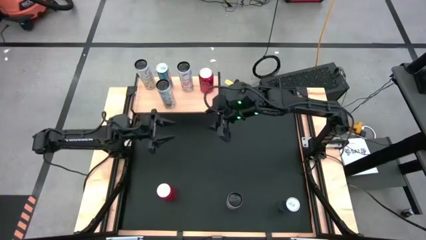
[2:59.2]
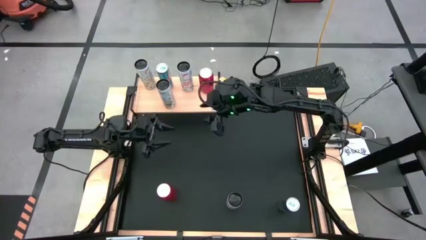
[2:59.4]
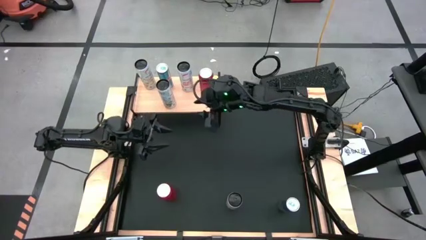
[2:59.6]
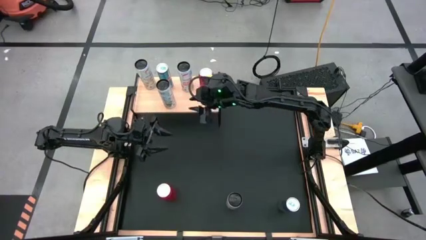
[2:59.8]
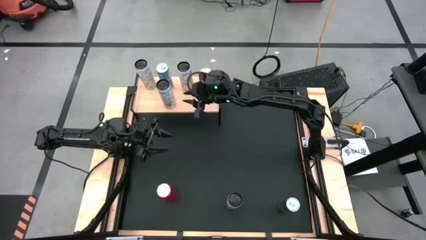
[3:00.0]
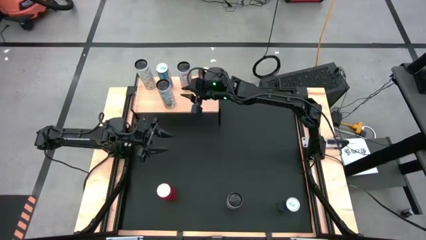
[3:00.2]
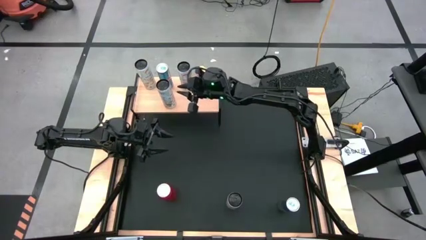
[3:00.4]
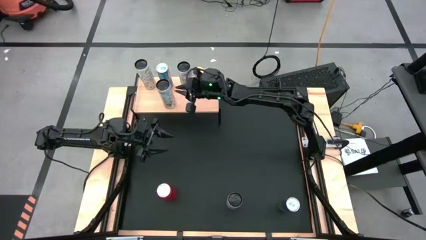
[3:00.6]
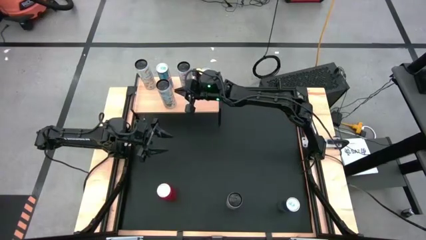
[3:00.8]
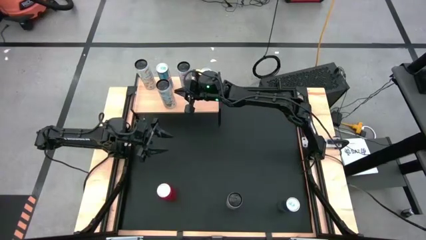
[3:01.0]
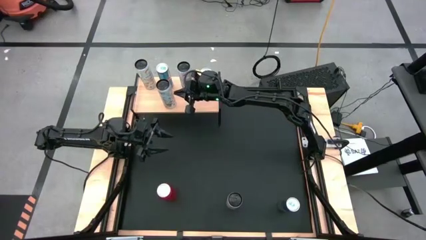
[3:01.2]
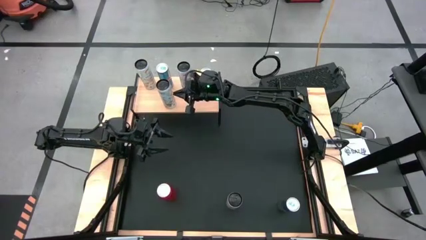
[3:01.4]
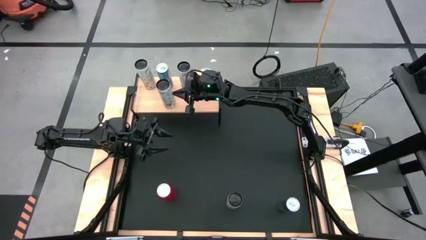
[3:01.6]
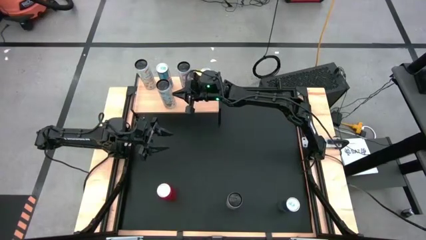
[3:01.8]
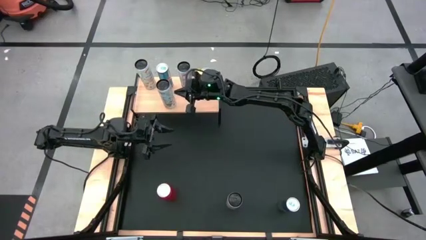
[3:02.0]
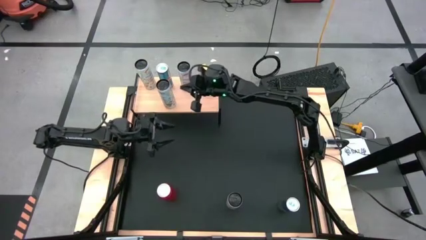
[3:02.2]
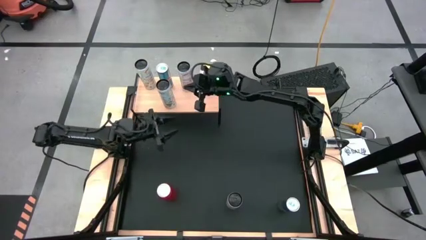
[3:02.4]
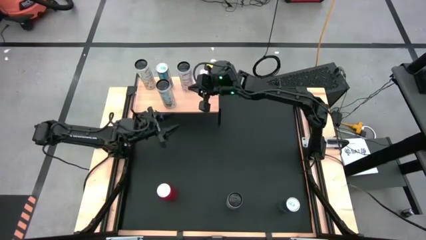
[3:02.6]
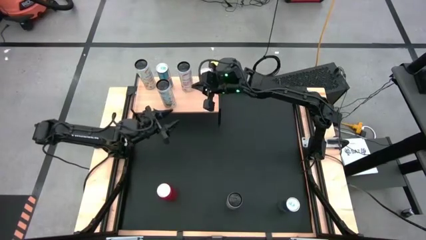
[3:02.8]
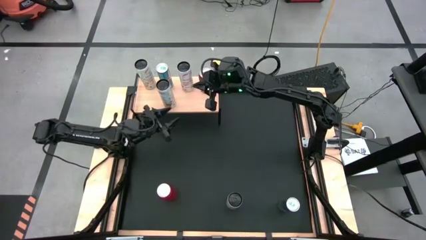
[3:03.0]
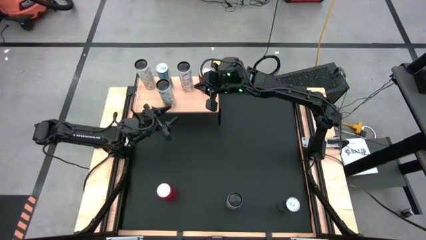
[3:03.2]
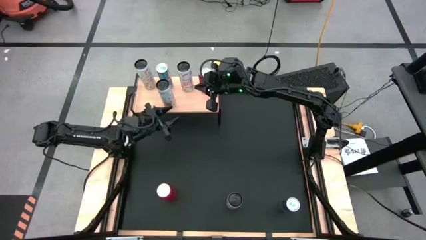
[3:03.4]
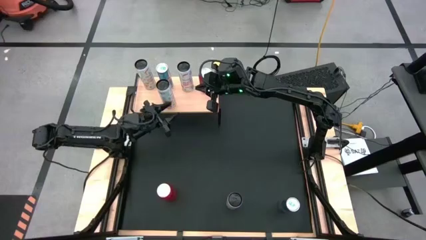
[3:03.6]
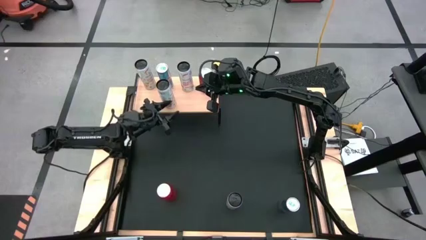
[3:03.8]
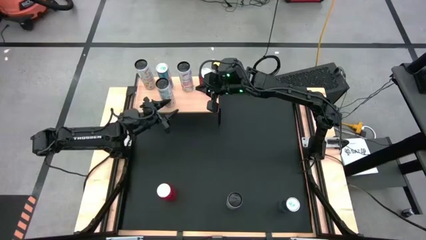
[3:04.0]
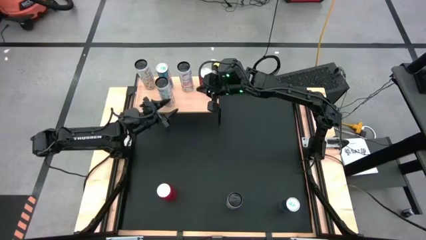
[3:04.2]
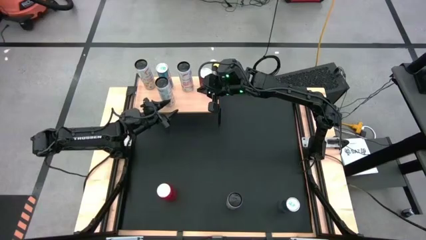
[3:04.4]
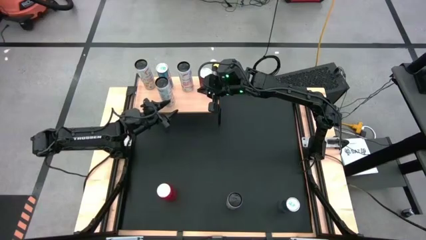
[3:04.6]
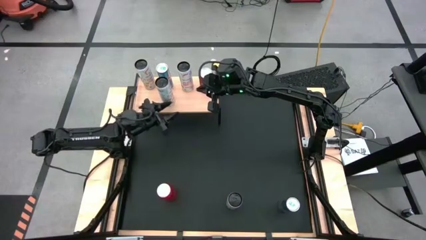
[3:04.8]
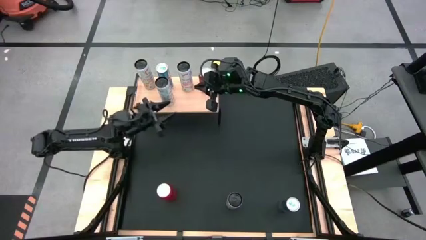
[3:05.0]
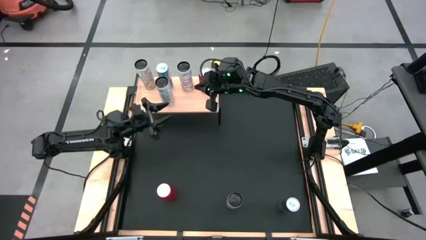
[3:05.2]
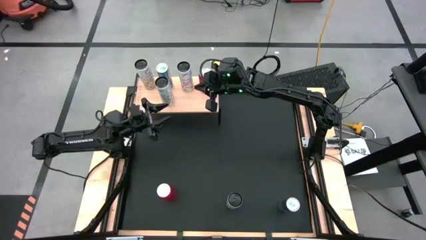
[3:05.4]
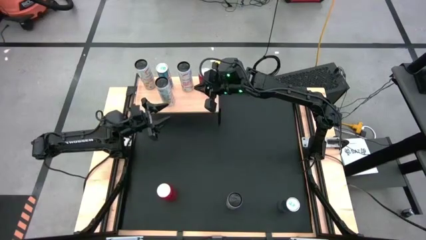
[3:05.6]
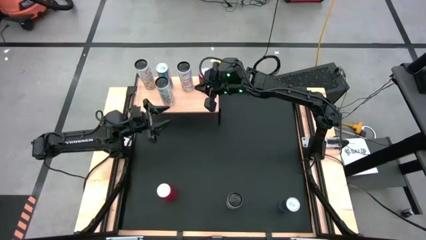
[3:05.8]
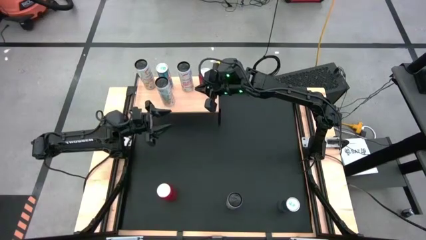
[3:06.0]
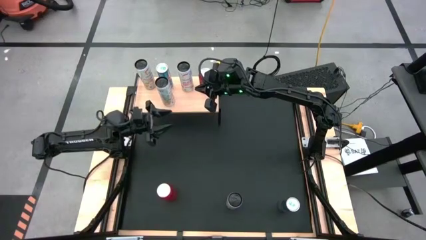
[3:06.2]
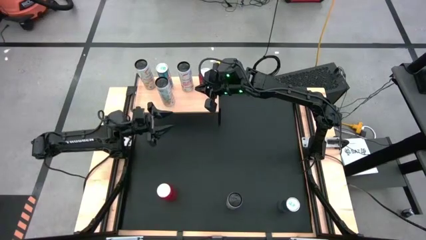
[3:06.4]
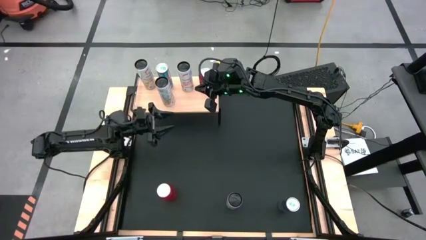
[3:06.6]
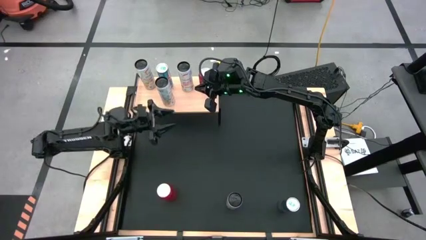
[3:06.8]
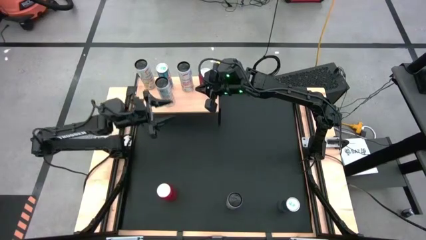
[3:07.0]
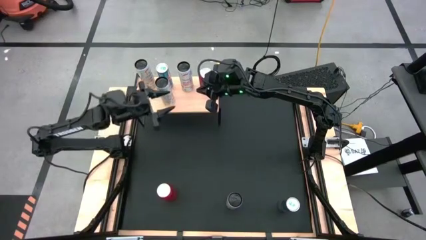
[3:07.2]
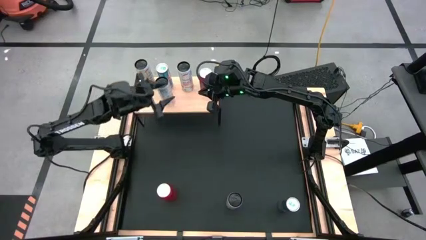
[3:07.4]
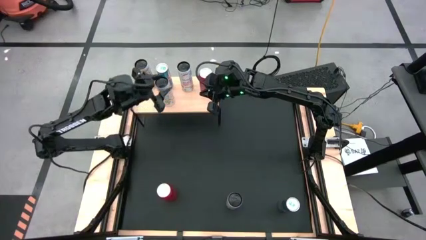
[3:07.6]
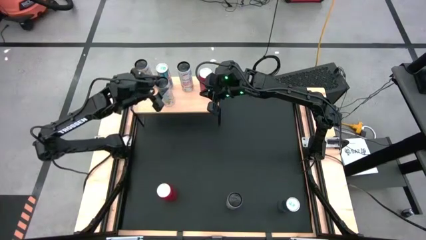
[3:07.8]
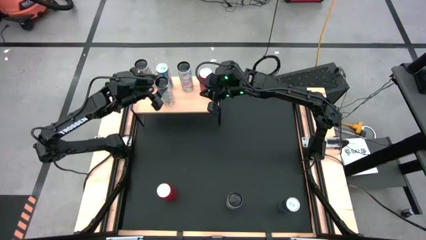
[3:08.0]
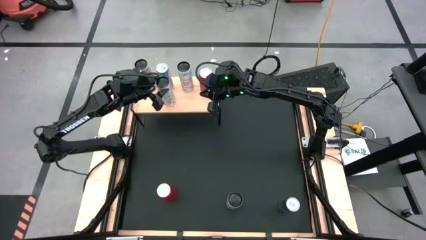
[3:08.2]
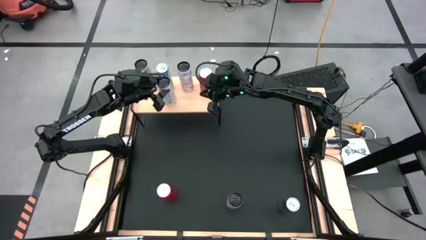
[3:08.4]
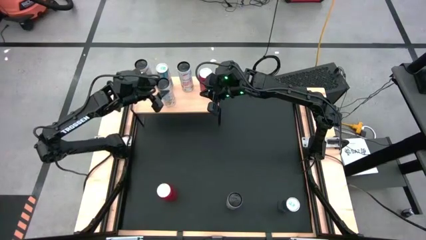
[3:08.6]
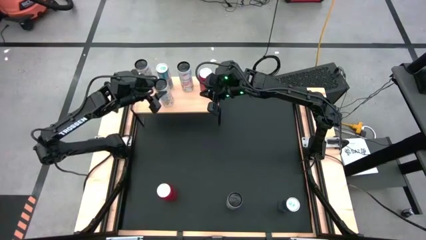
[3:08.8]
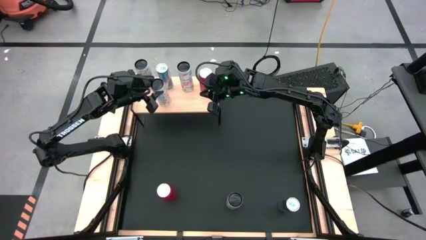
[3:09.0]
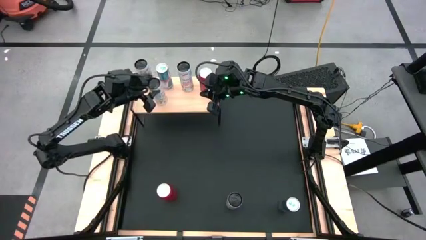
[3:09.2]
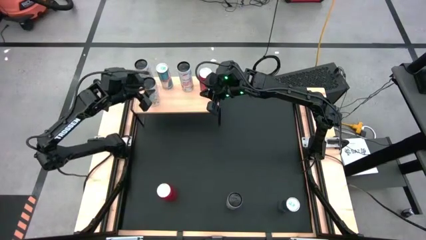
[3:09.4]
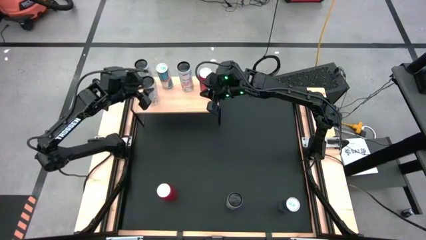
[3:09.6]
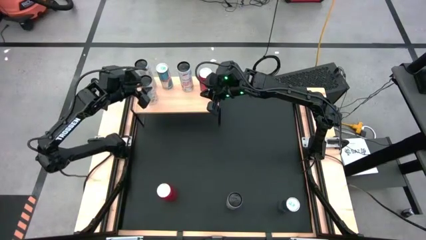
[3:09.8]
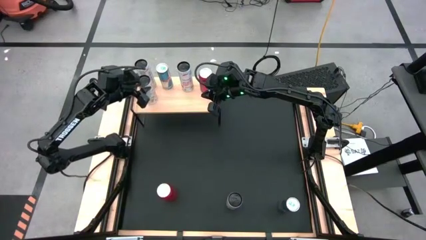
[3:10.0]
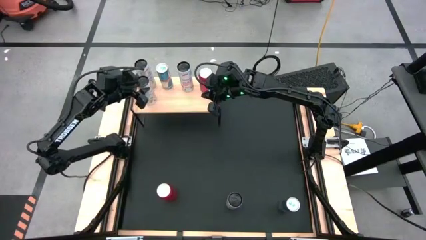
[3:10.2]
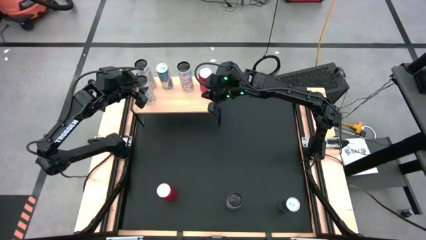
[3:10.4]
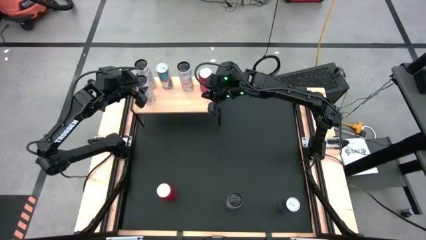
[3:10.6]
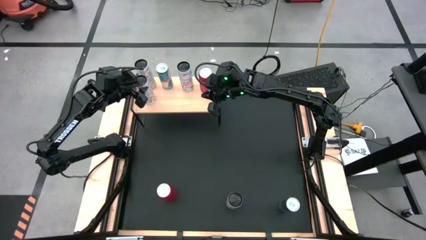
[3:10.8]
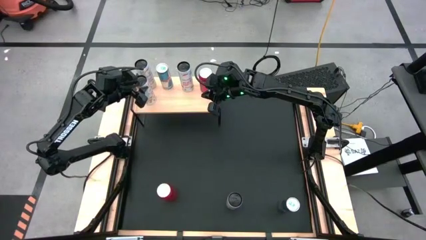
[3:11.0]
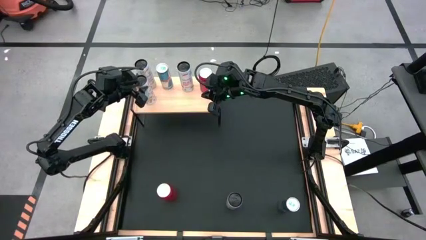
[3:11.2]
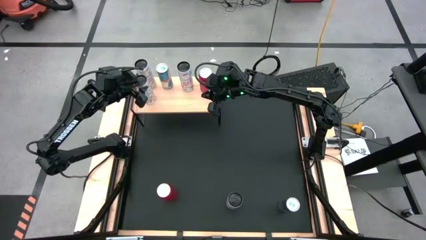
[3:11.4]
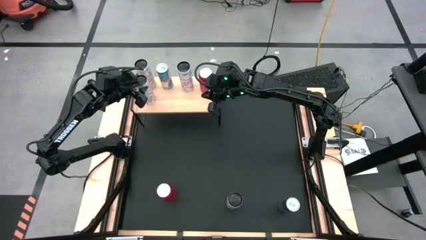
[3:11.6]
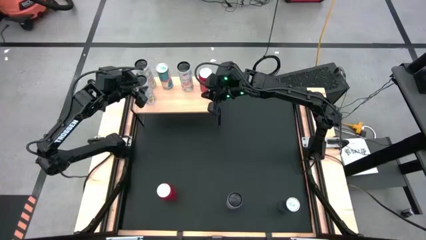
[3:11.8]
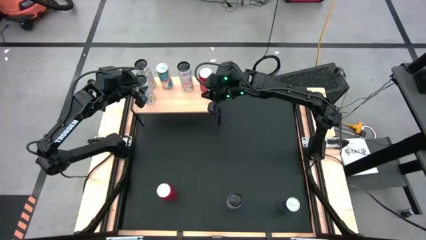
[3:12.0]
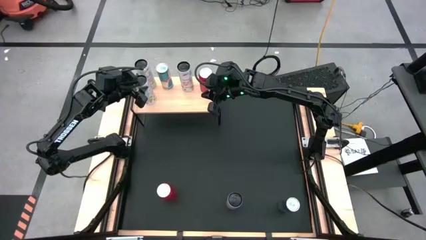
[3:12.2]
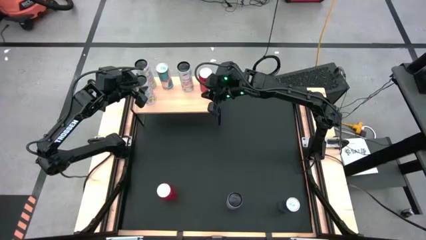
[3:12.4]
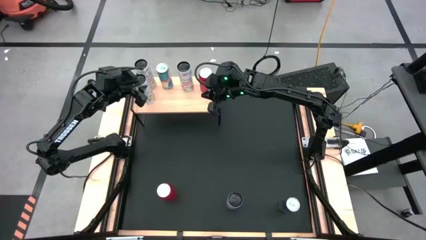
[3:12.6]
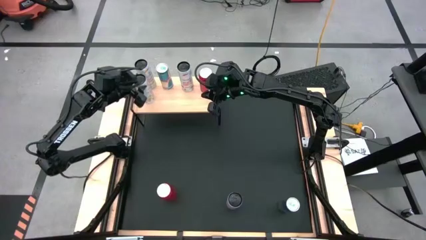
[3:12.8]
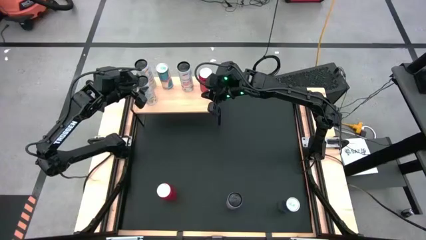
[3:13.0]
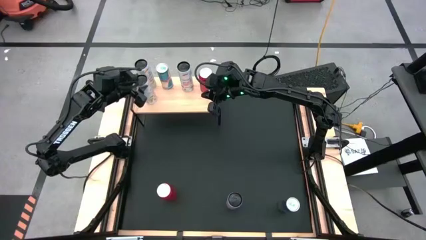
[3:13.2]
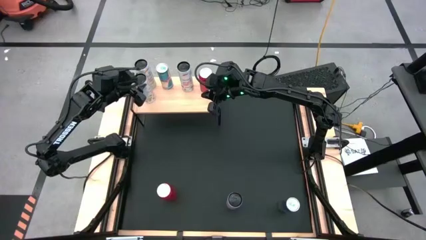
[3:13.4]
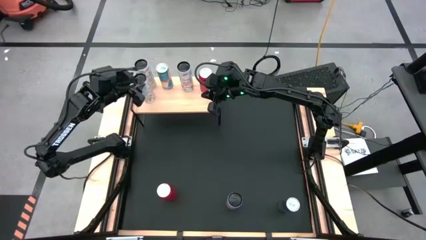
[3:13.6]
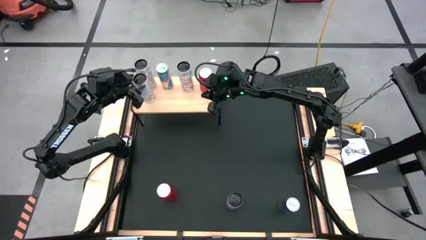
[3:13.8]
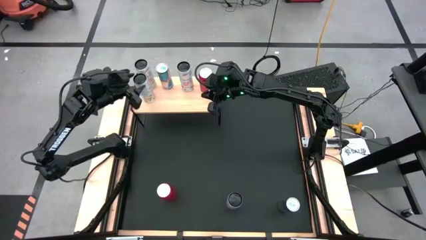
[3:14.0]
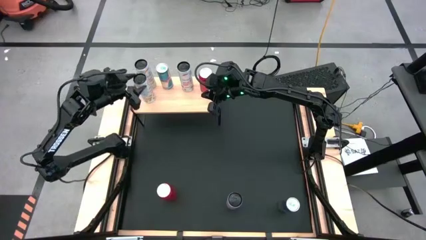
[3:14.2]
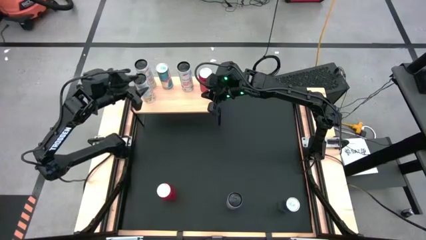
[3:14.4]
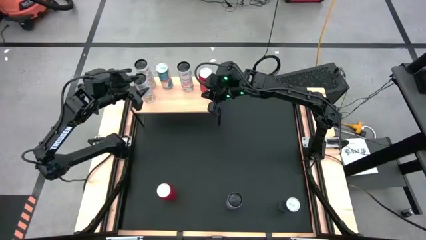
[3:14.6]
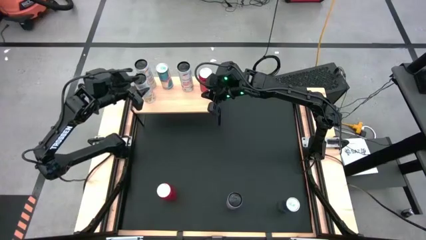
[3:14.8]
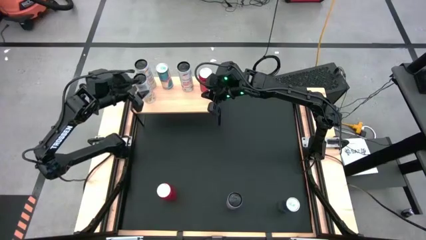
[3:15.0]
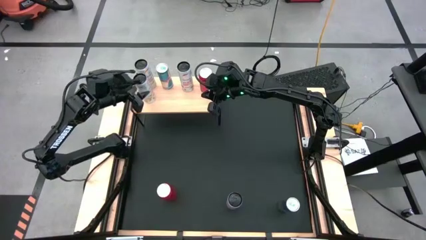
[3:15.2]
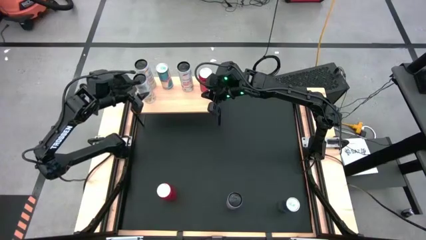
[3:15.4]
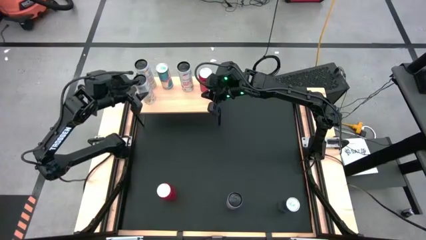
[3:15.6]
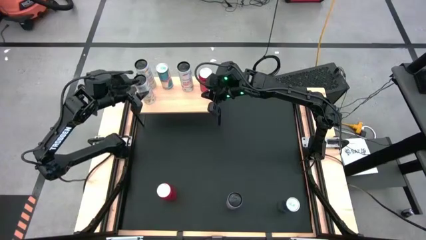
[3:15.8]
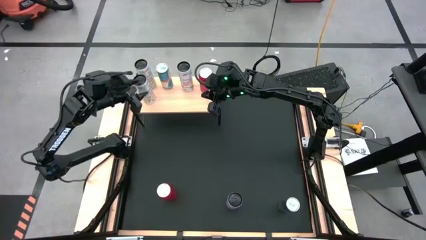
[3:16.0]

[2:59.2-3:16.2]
Task: Place canned beverage on shelf
Put the white yellow soda can on the shelf aligned with the white yellow soda can
